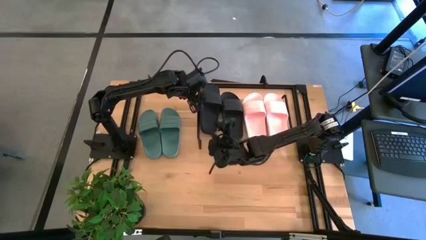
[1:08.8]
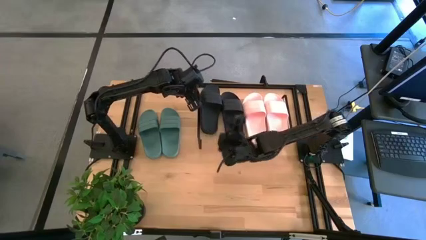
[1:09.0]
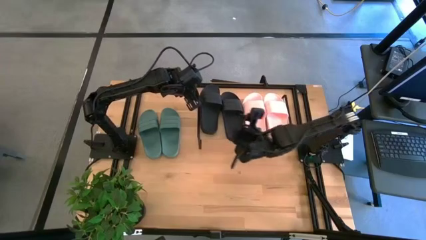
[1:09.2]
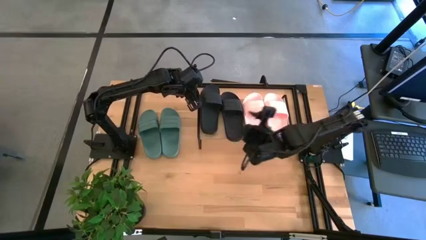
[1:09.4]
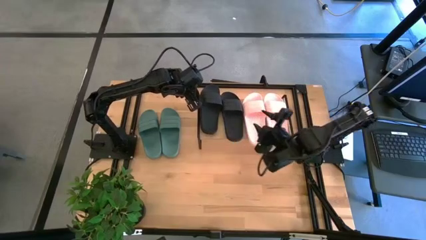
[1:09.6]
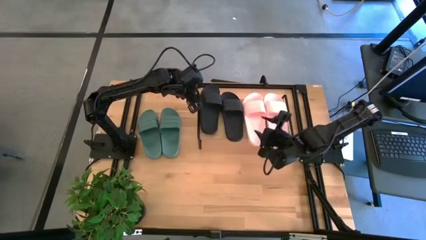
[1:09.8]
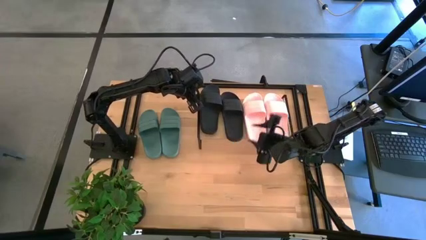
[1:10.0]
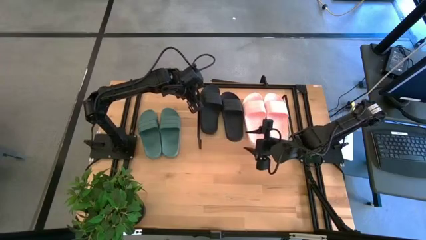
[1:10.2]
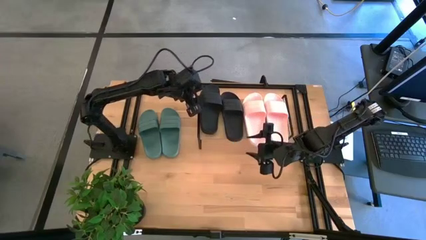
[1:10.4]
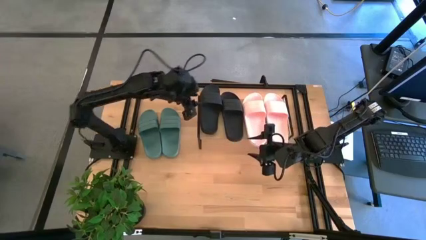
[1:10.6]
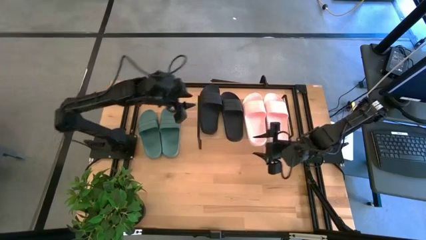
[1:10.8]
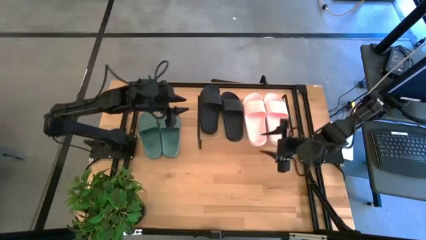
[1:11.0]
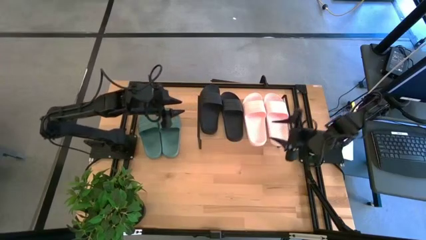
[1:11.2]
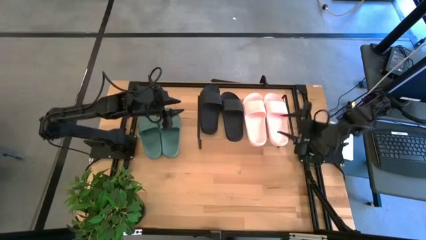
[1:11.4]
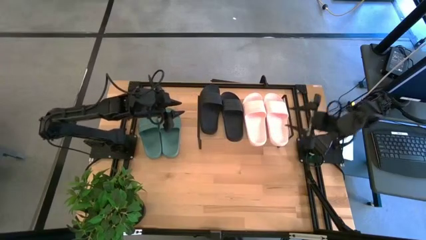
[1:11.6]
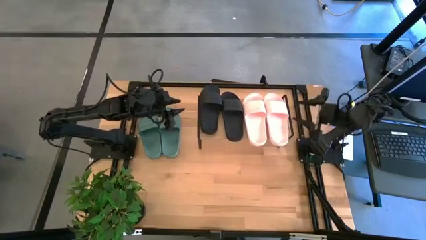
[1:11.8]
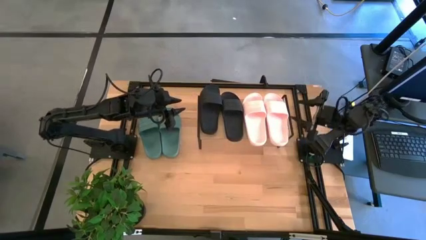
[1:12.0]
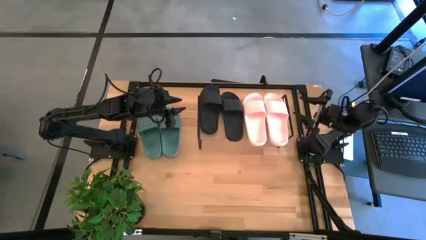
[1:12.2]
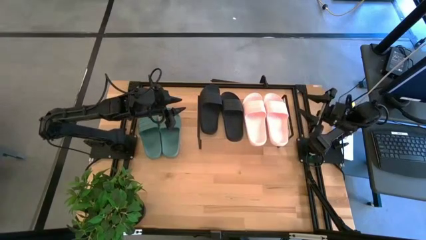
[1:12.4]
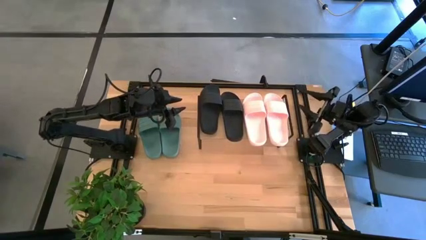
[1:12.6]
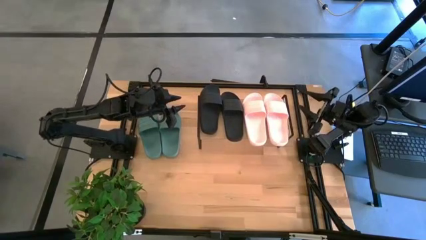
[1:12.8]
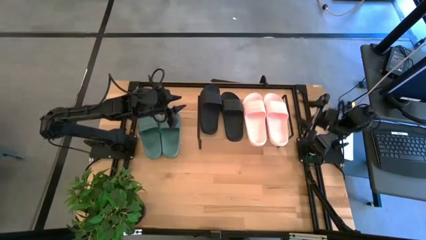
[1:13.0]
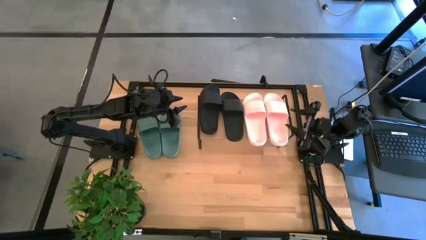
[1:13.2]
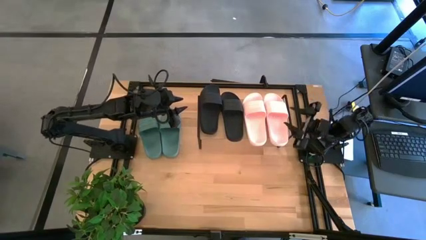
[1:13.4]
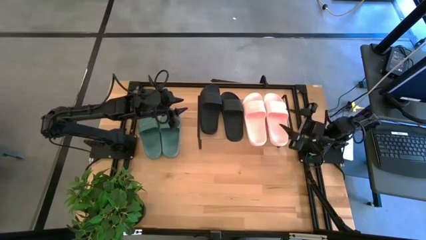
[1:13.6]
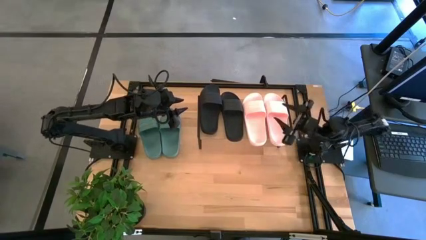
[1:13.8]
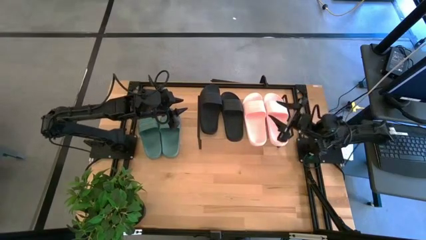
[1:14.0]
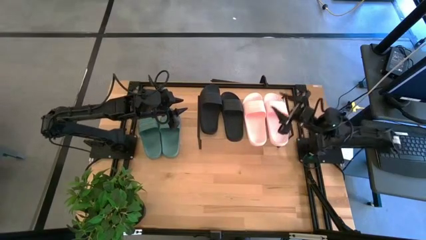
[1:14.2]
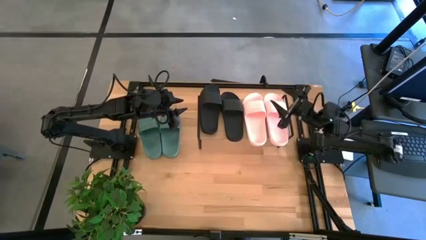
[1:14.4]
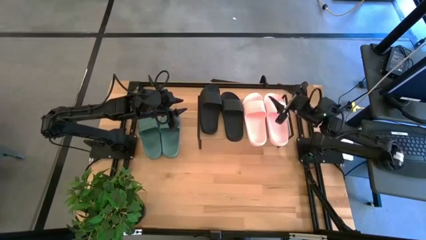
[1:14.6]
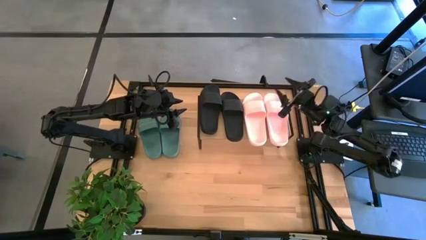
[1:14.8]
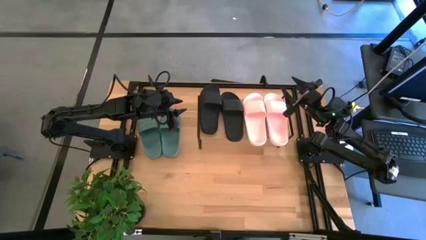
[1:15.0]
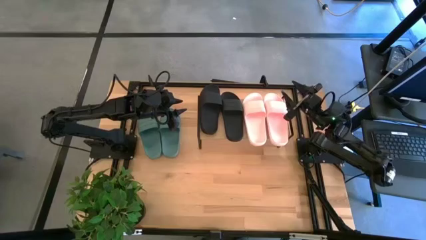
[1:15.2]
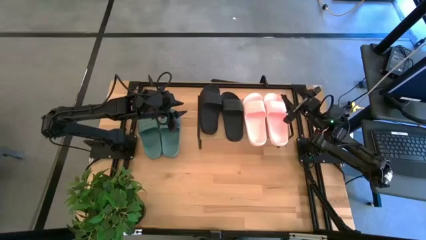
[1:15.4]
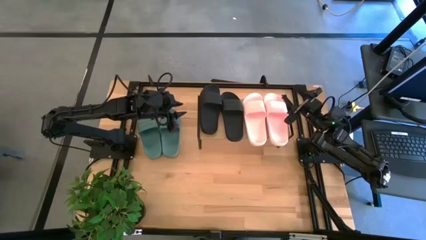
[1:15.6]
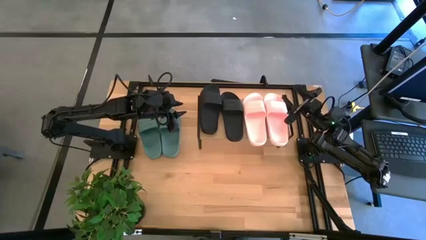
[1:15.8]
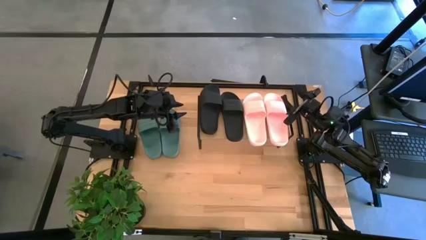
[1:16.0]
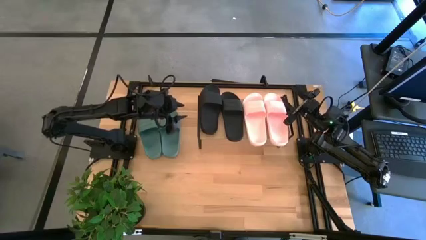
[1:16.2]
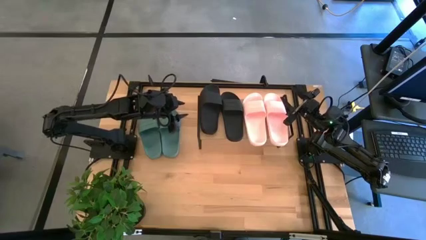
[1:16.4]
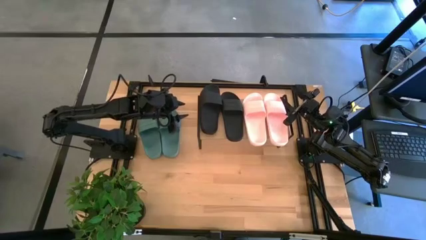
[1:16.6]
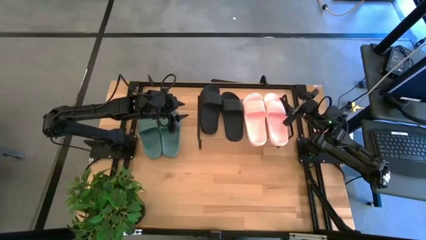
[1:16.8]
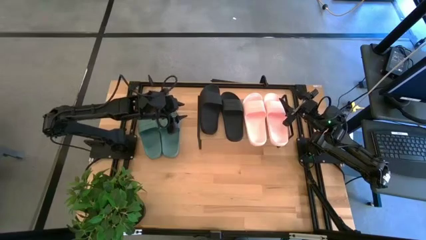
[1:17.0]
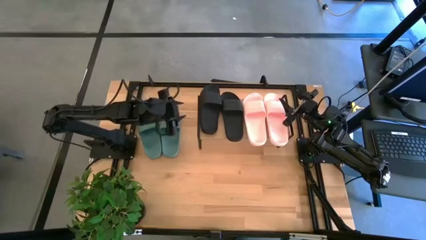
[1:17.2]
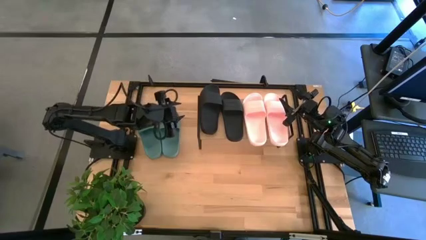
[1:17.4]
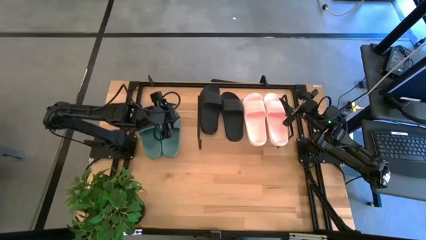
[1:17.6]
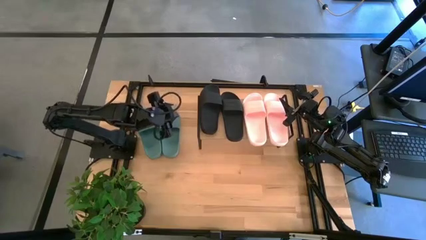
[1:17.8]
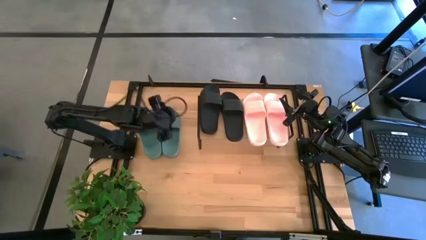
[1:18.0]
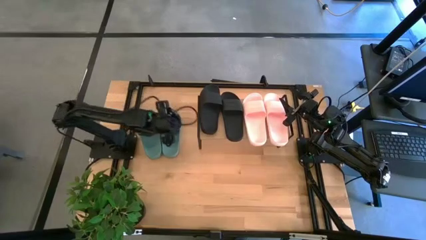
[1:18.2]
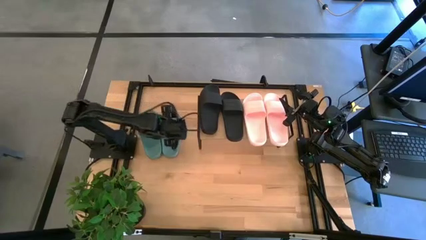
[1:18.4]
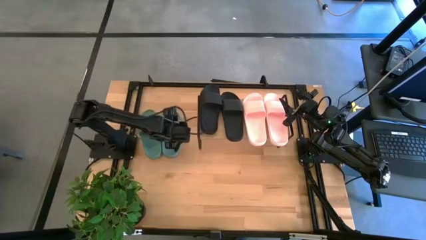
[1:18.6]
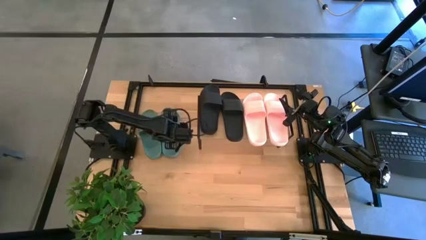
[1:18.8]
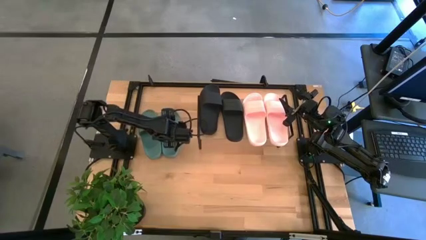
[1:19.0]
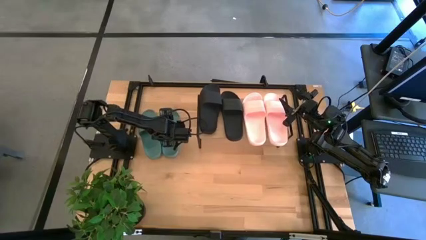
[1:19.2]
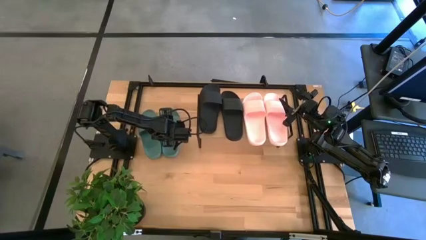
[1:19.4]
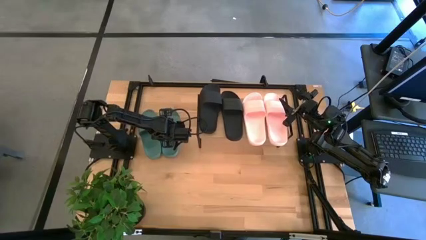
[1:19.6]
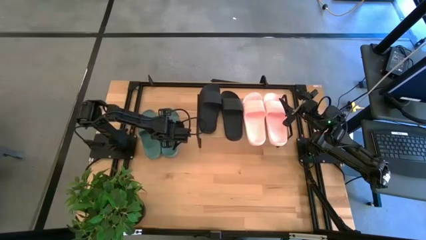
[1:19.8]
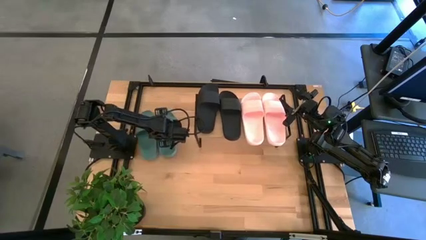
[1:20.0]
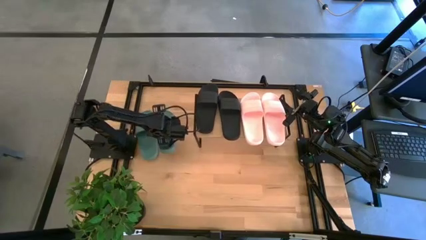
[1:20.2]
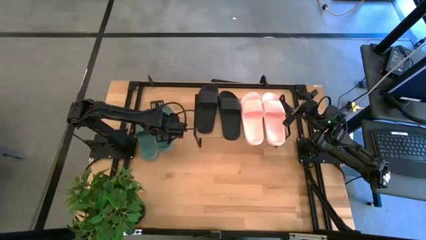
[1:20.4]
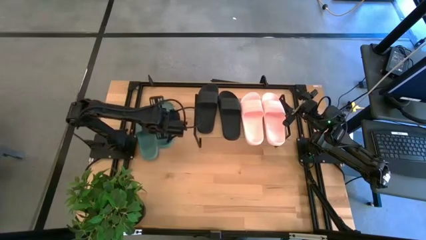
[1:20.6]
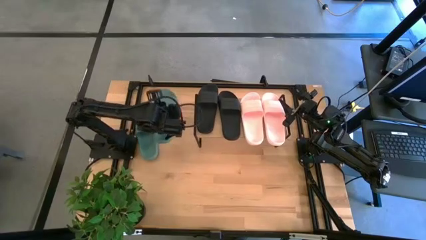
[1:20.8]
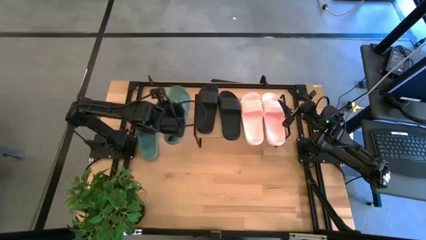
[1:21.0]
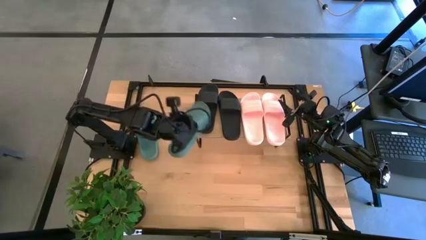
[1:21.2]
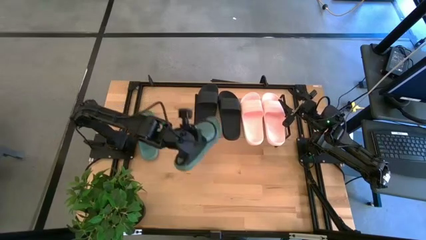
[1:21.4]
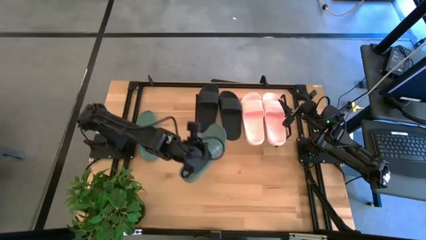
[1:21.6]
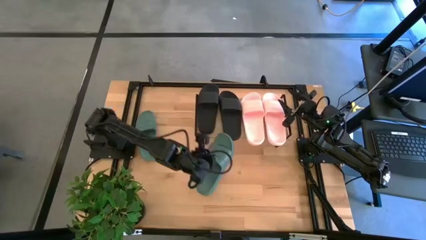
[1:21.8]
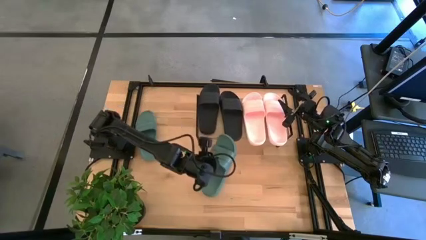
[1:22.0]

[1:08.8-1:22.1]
Task: Pick and place slides into the shelf
Put the right green slide under the shelf
